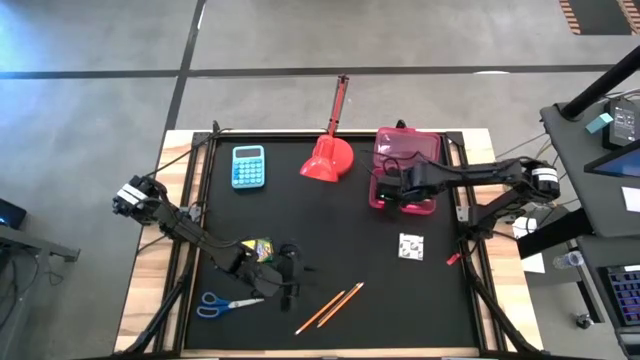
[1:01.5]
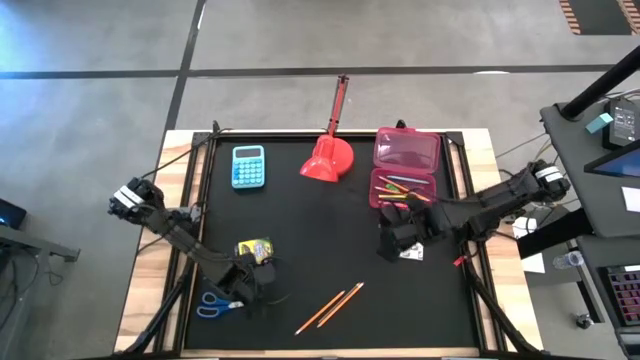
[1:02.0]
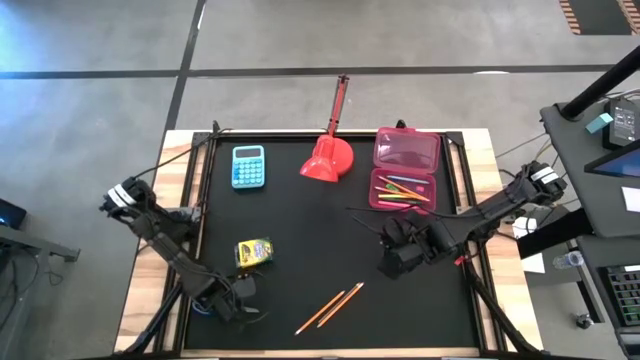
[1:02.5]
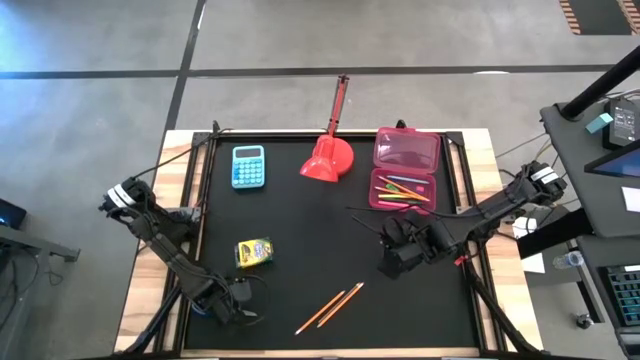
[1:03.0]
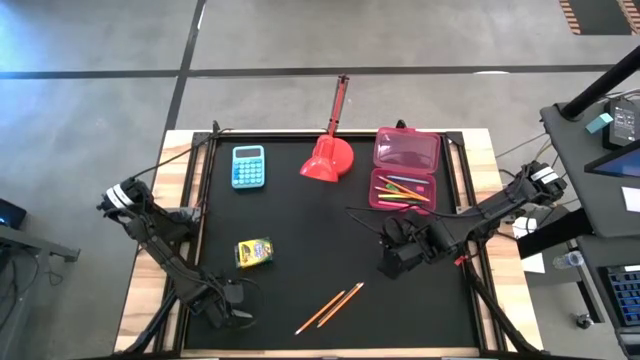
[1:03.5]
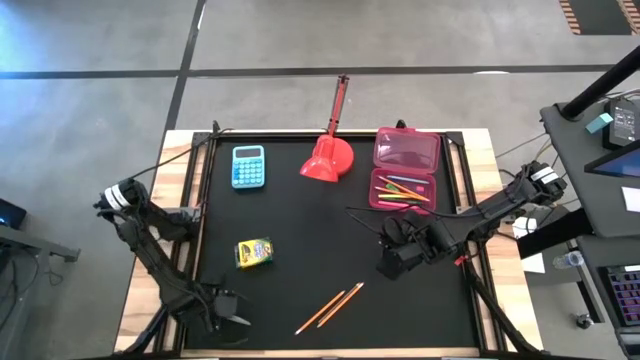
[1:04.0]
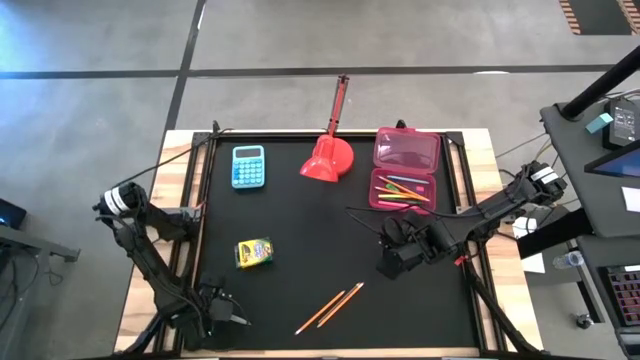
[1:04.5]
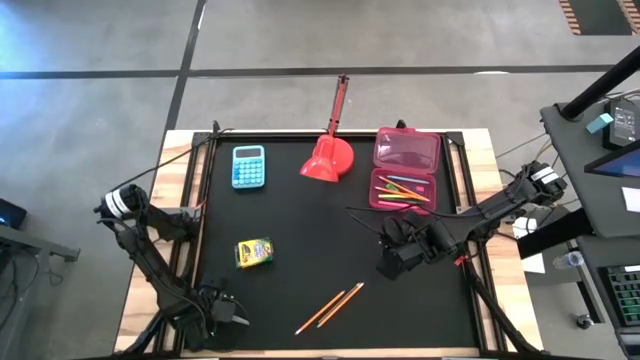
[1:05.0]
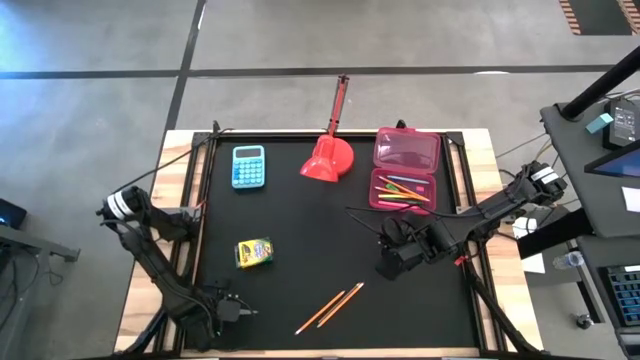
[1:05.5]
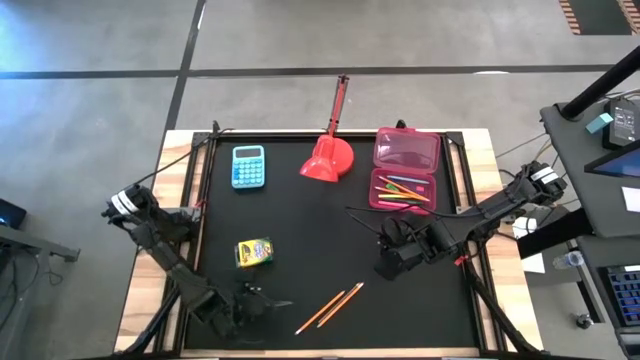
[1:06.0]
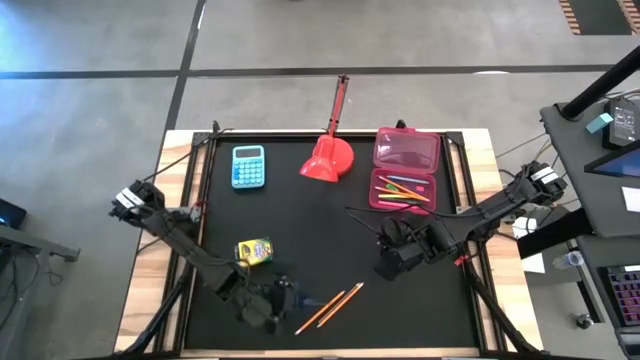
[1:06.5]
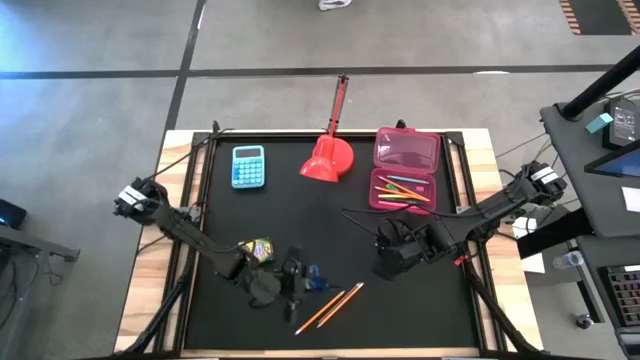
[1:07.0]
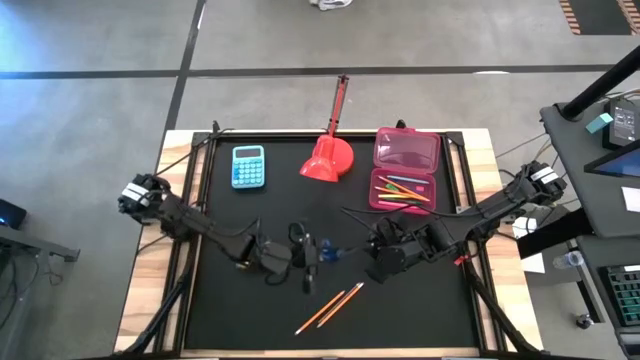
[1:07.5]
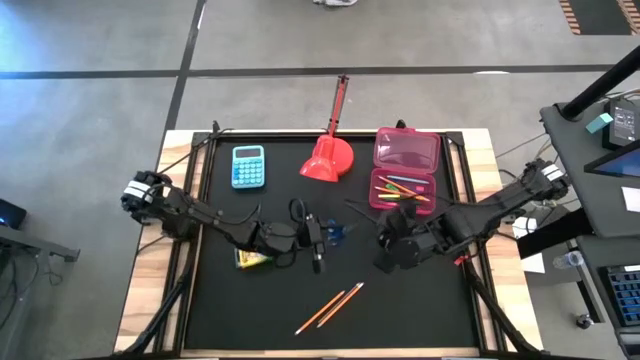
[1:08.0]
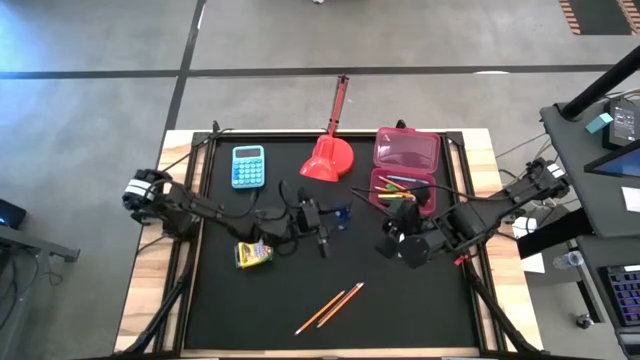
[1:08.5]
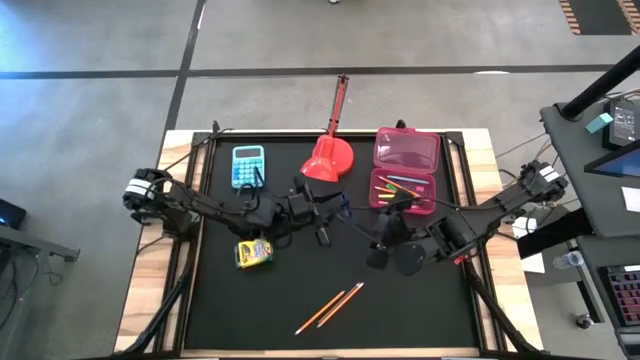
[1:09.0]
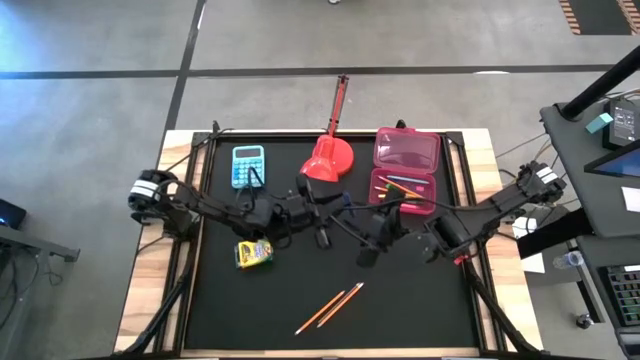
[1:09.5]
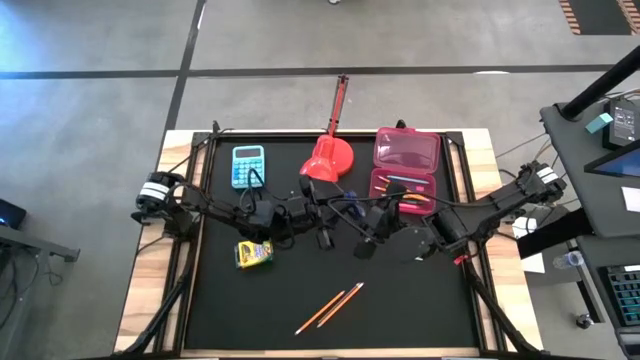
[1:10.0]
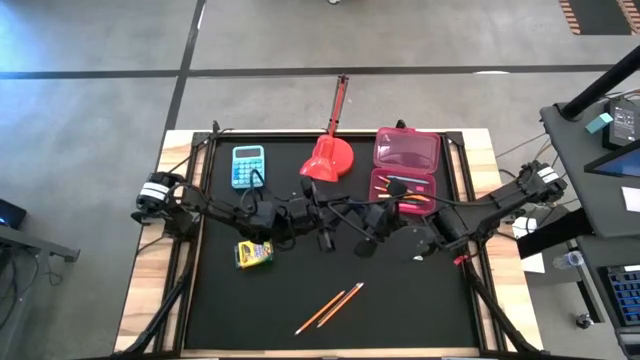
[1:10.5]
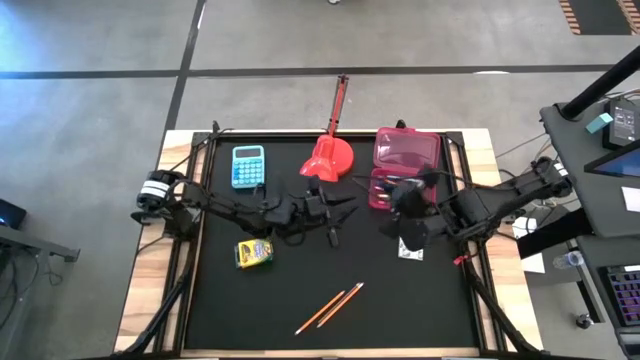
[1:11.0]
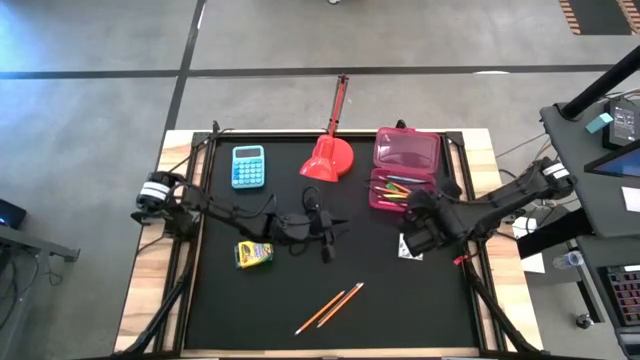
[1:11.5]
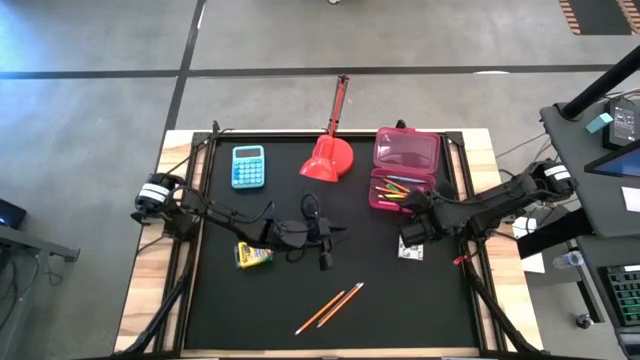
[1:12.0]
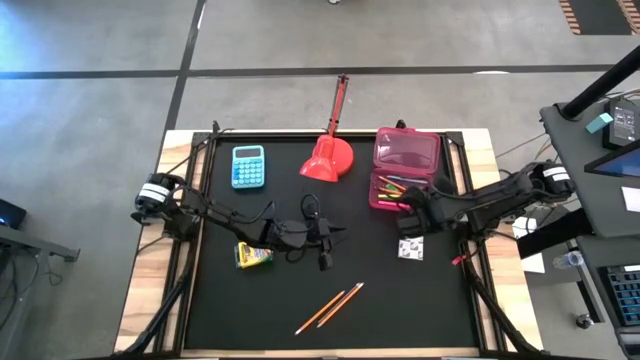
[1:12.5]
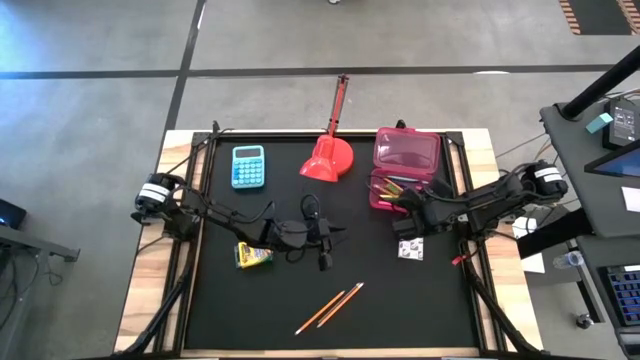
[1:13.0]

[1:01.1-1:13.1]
Task: Pack school essentials
Put the blue scissors into the pink supply box

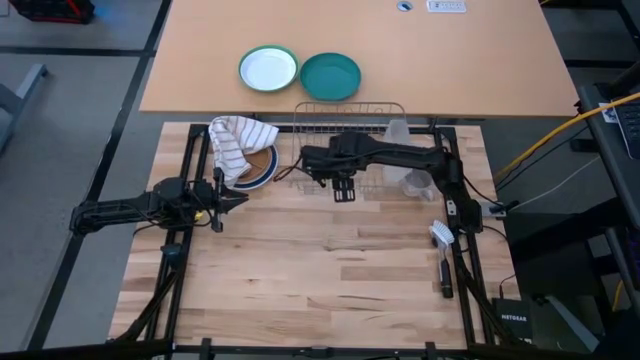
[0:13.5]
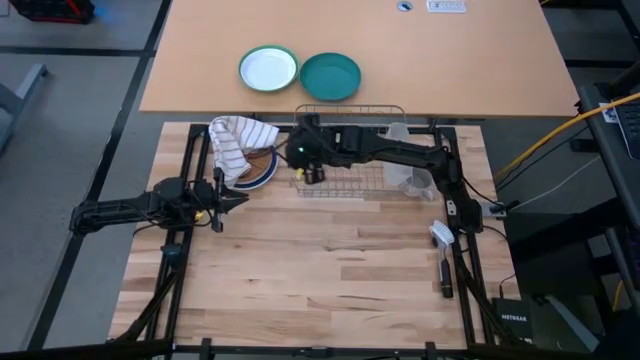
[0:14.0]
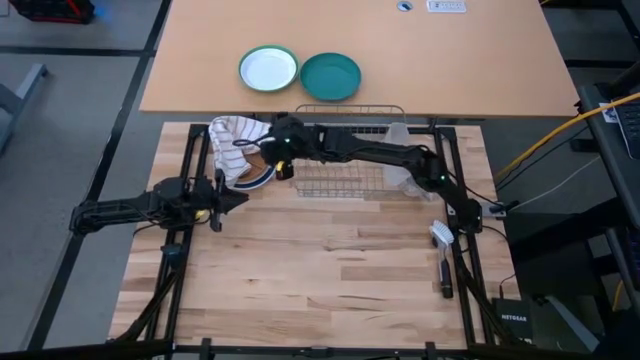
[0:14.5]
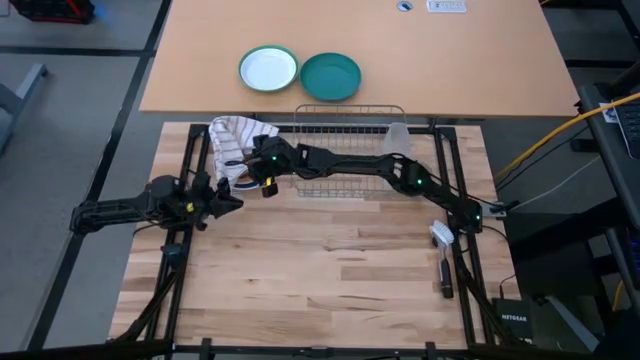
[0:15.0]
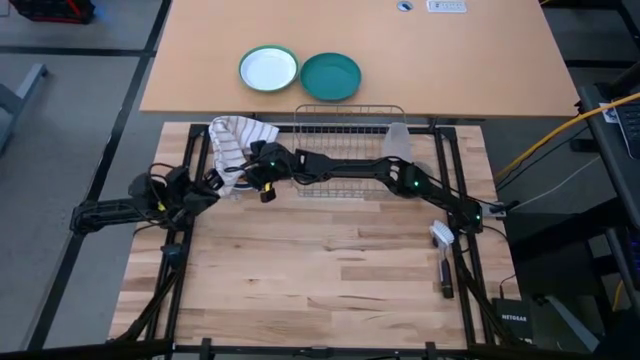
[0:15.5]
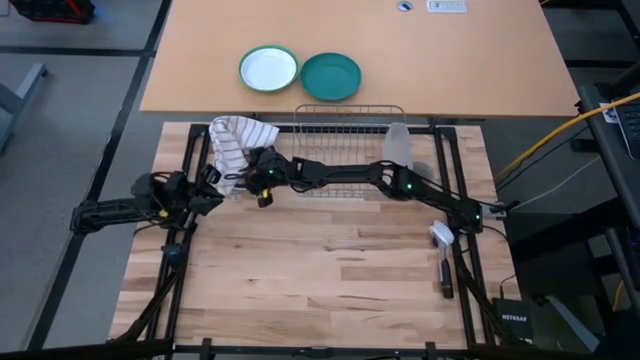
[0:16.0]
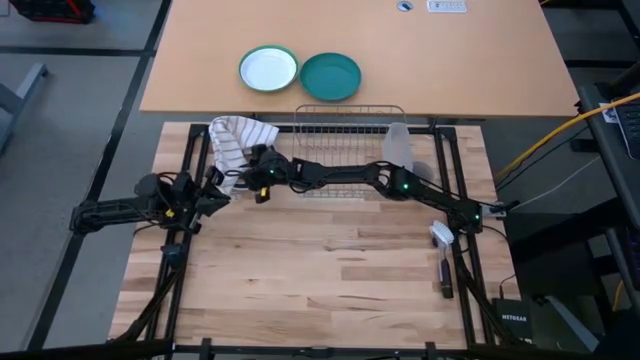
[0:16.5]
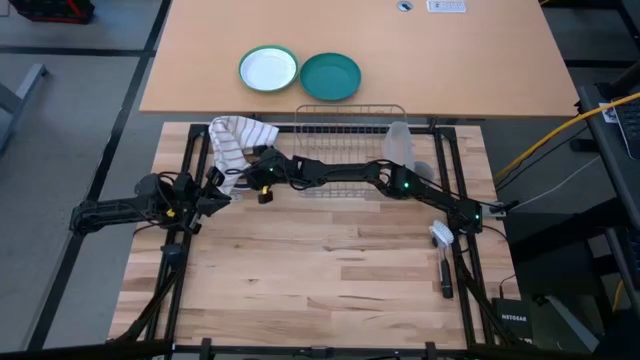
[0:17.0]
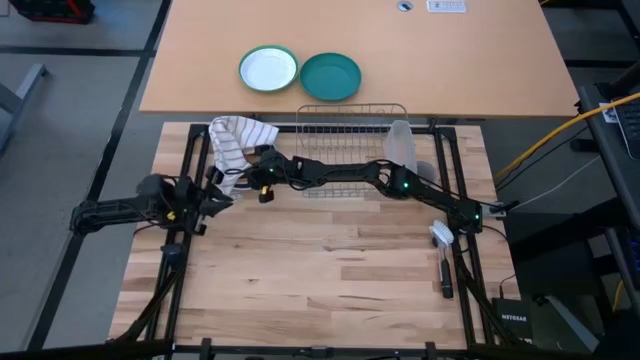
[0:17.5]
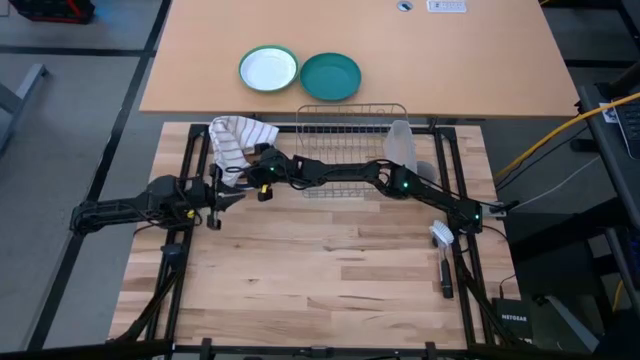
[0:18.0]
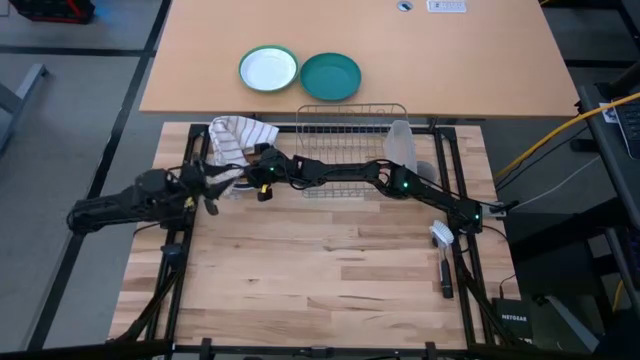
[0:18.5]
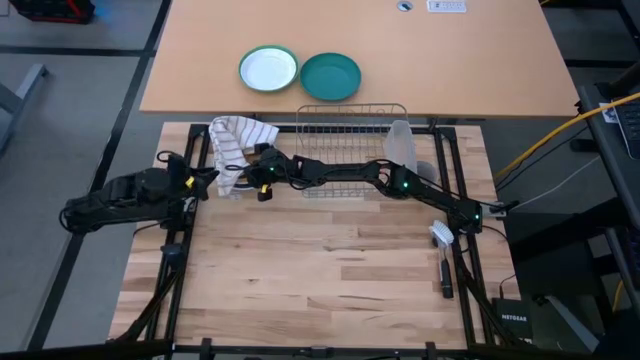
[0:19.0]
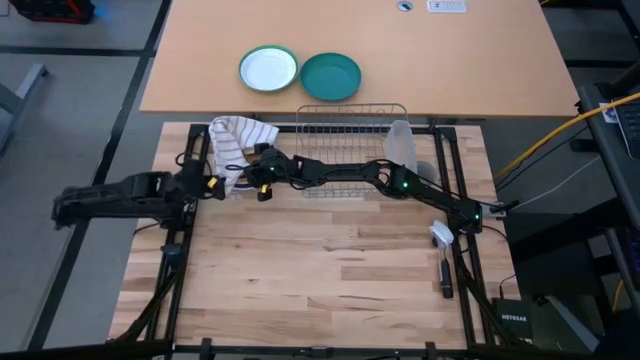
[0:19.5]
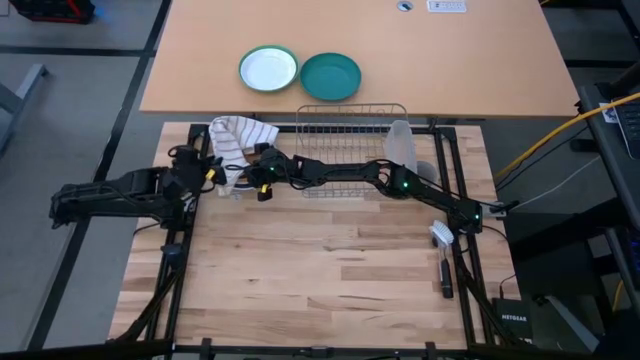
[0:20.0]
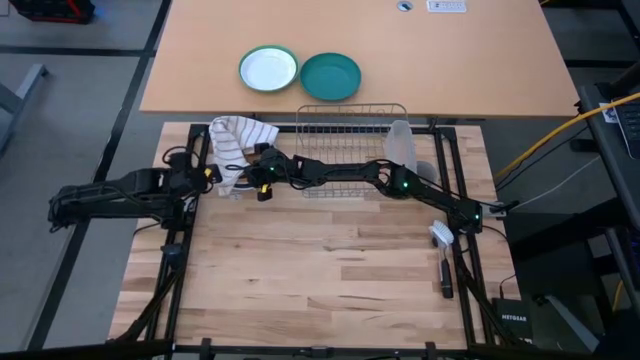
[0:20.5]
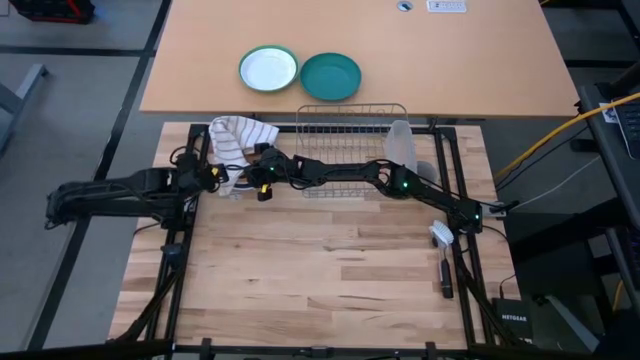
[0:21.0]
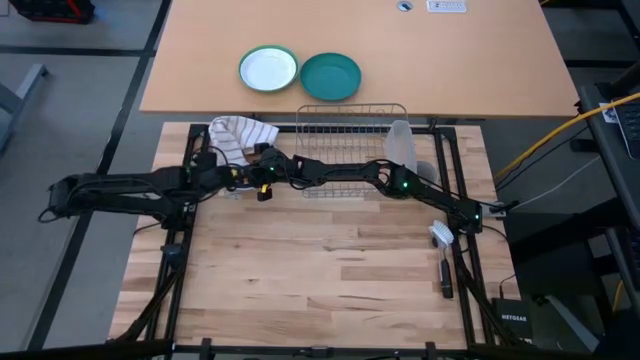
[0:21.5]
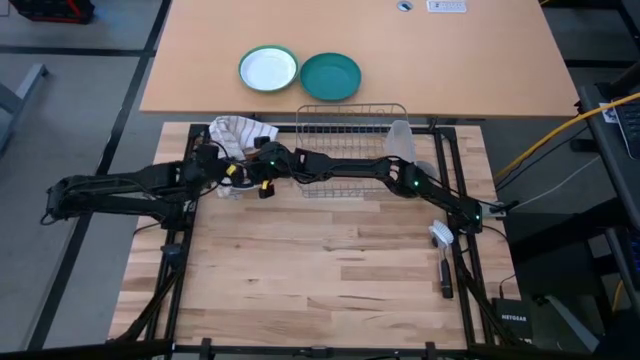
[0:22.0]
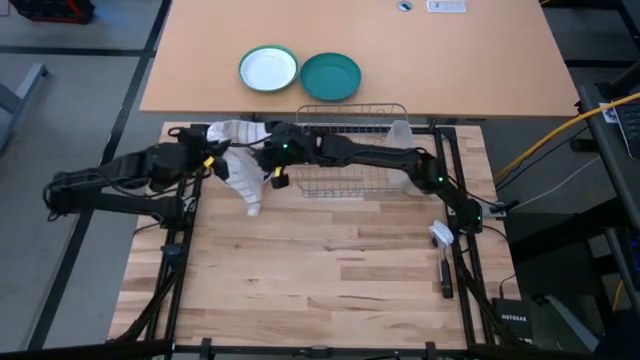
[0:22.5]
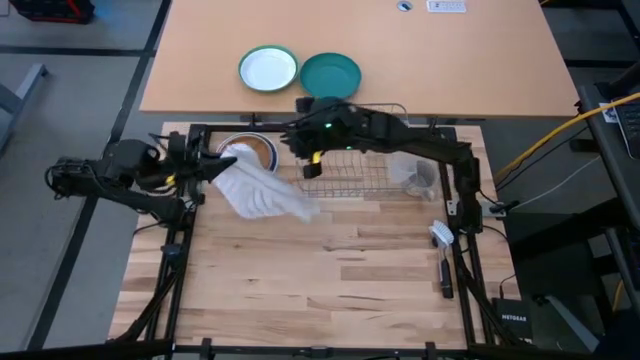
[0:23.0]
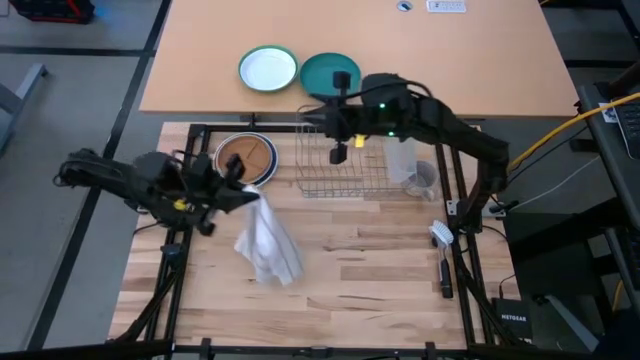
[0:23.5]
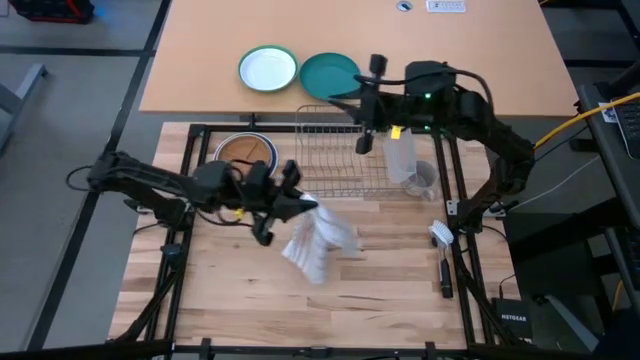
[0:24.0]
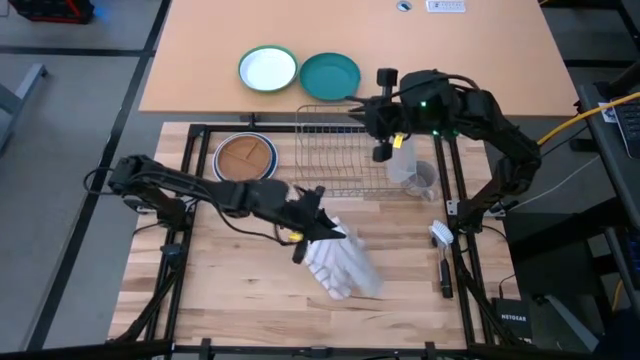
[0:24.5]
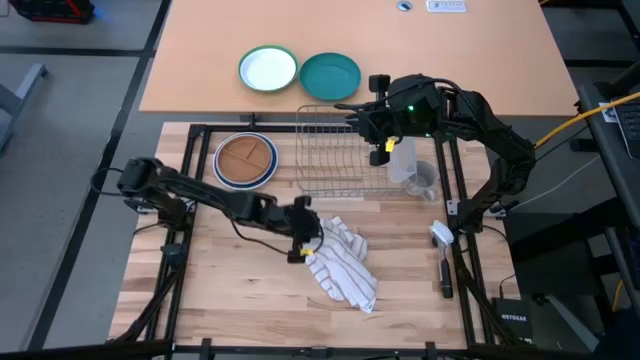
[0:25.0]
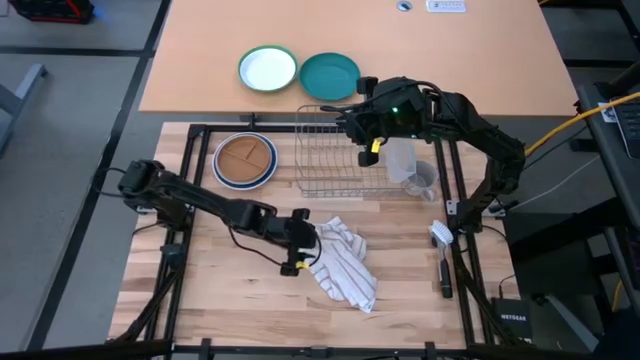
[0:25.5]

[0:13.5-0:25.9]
Task: Sort dishes
Put the white towel on the table
